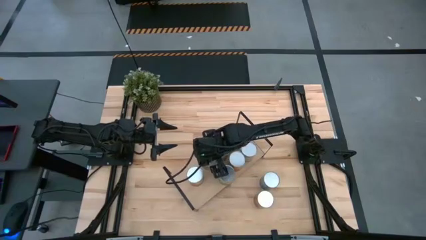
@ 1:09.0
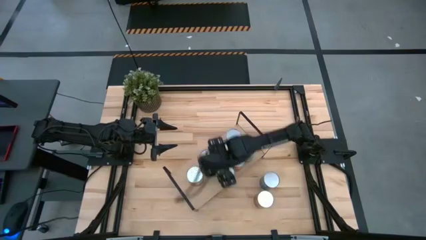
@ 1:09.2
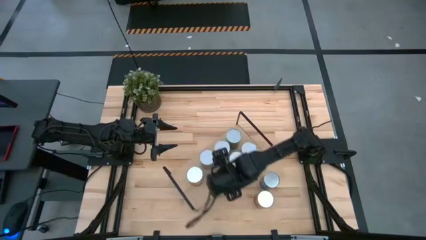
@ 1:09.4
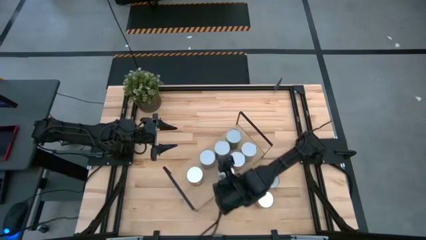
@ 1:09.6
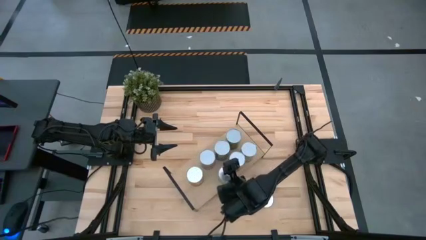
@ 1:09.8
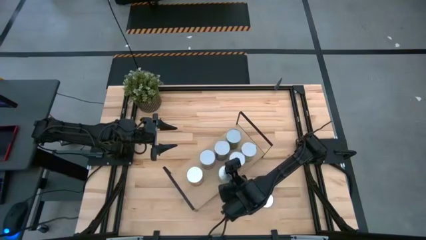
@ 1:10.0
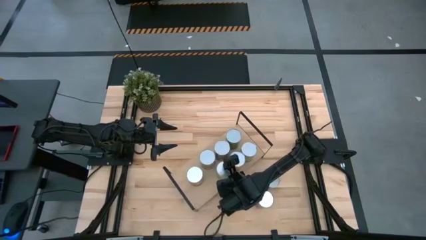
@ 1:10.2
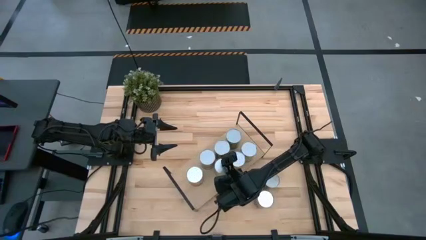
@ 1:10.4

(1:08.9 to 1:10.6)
Task: Pick and place cans onto a shelf
Adjust the canned oranges on the shelf

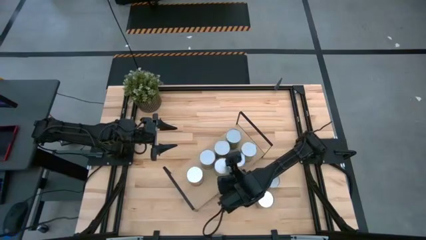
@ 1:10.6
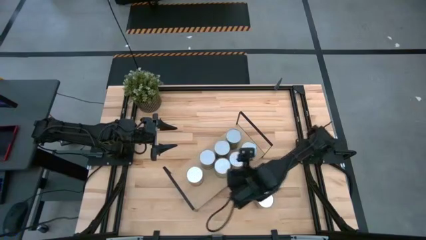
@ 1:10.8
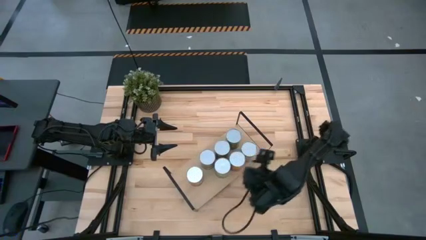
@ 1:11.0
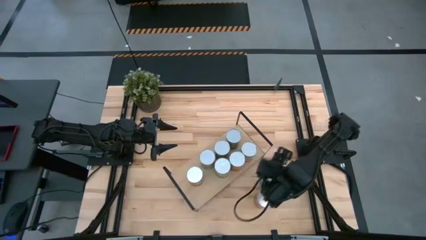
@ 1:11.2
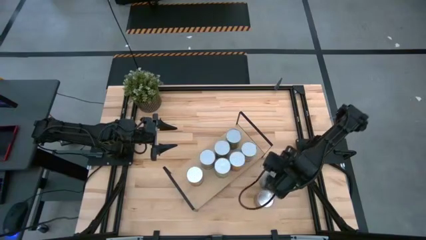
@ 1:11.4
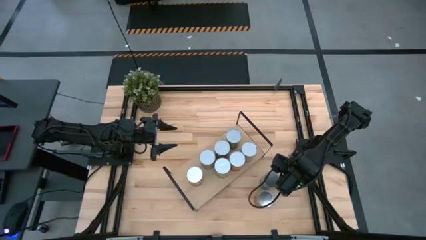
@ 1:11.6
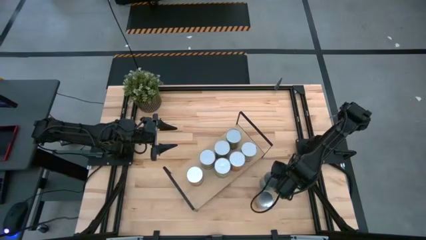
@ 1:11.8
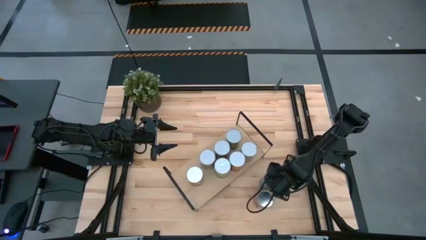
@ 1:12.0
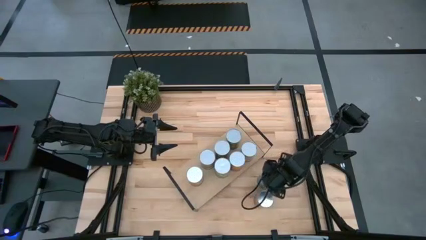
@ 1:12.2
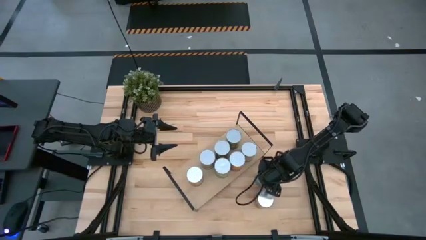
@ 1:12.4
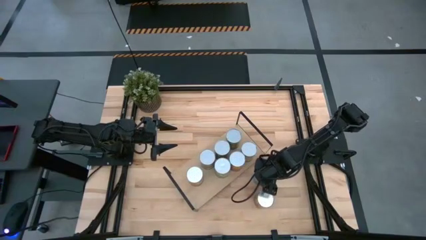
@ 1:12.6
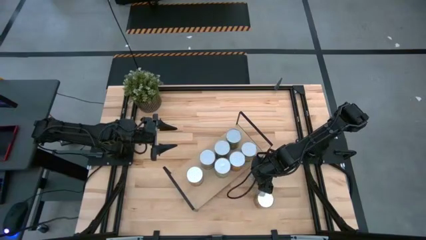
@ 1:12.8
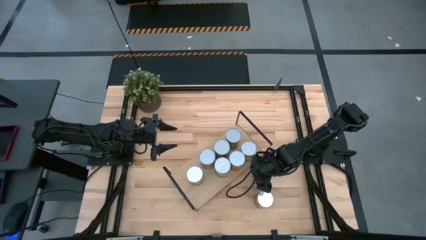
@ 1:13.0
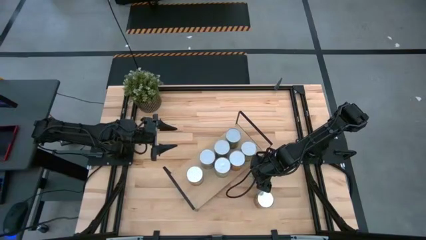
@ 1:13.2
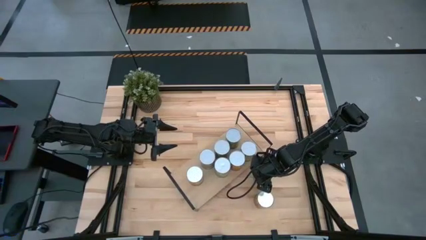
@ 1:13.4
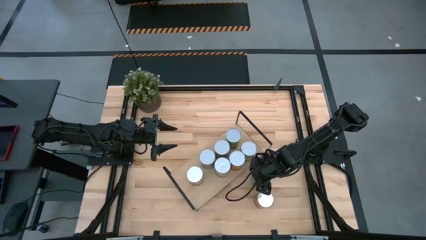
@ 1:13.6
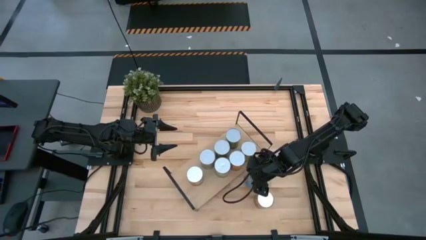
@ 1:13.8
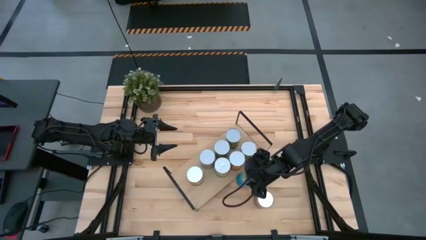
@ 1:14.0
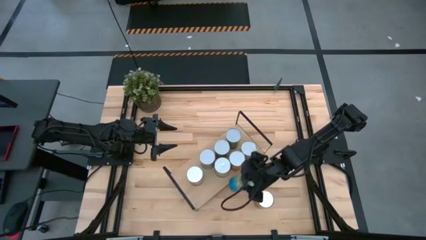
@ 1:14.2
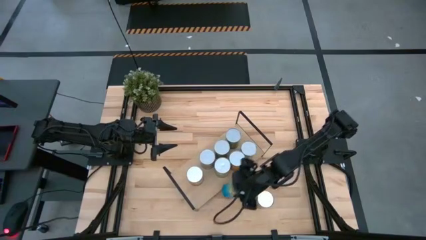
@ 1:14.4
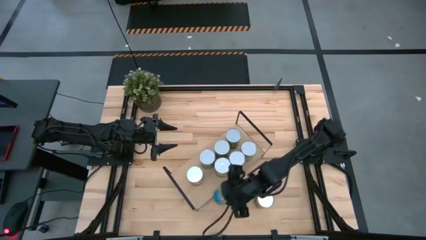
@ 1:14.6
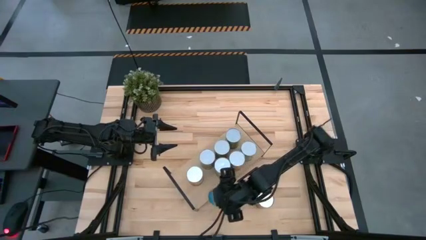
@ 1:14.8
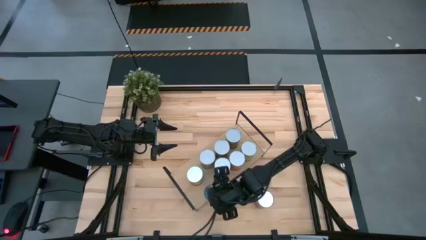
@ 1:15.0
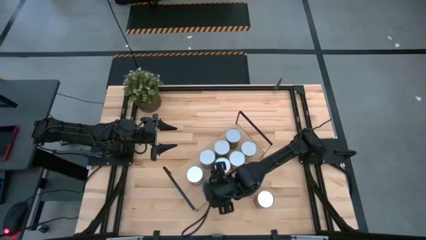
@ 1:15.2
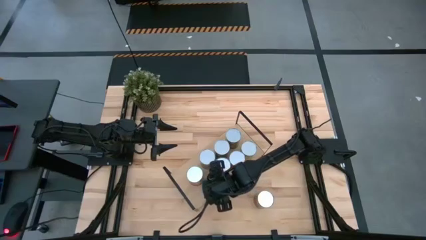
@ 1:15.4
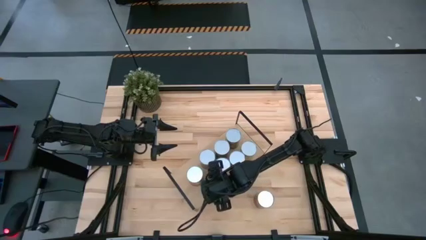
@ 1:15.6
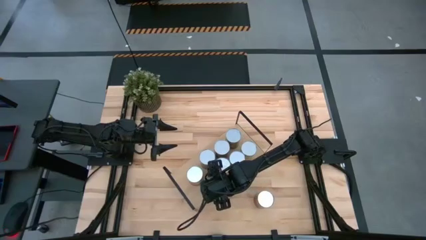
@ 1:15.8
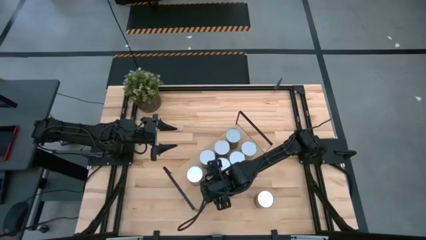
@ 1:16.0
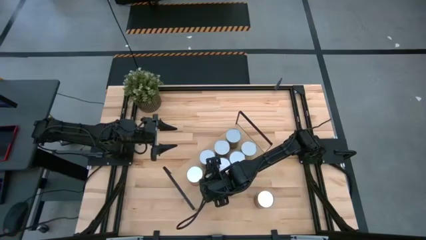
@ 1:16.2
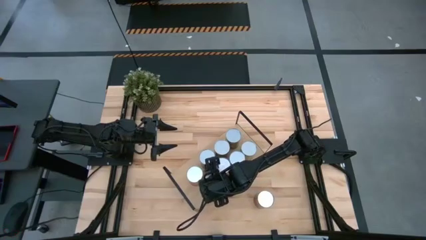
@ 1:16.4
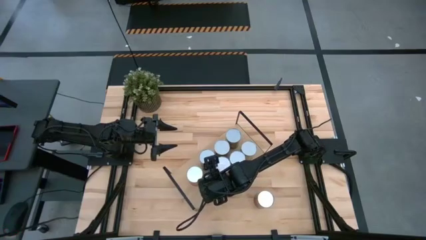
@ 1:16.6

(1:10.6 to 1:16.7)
Put the canned cherries on the shelf

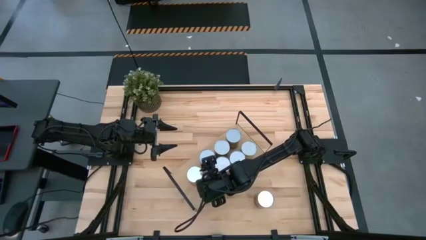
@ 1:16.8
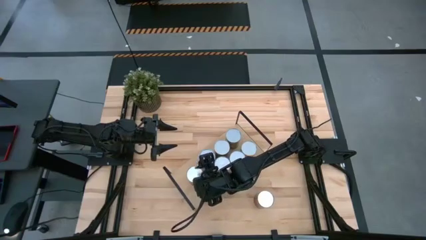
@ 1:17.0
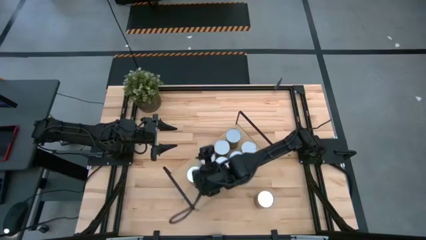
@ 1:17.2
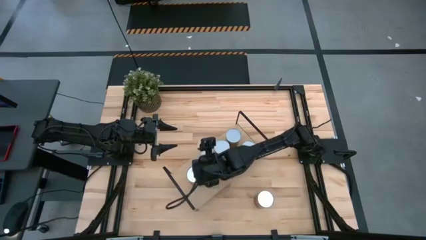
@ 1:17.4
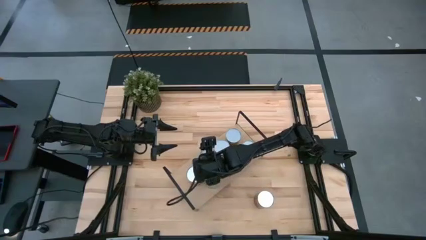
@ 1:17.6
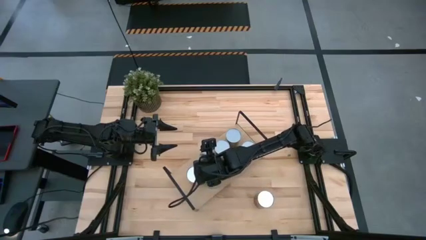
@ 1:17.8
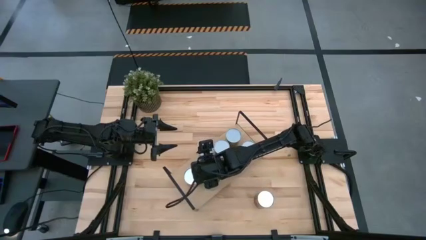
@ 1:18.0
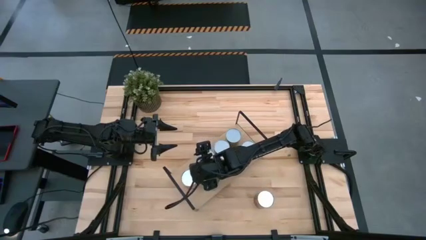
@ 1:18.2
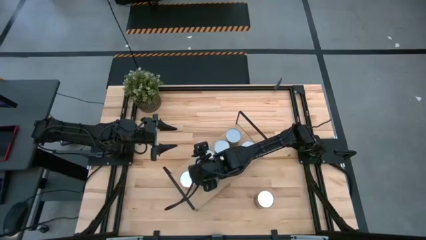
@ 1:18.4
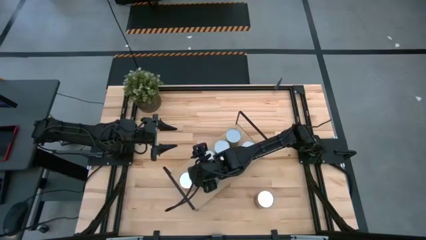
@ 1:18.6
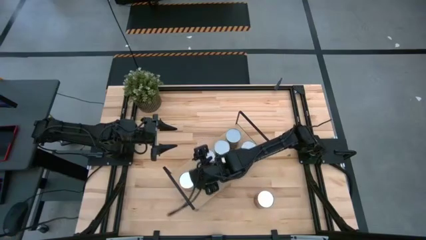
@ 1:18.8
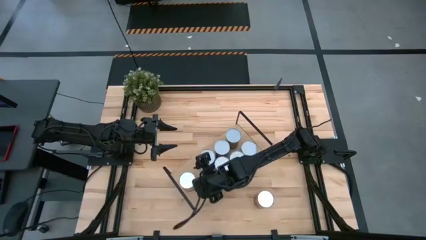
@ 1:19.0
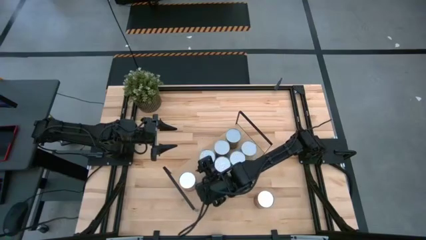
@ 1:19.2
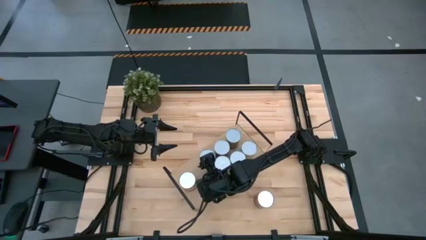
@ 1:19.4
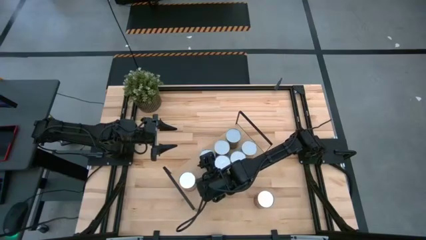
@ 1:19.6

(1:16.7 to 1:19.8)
Adjust the cans on the shelf

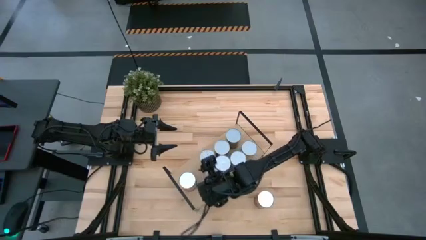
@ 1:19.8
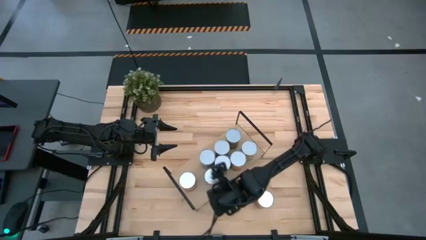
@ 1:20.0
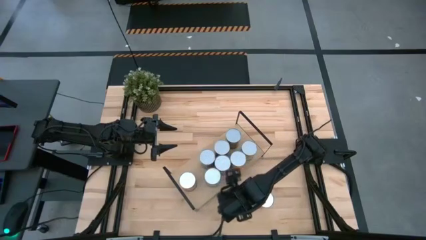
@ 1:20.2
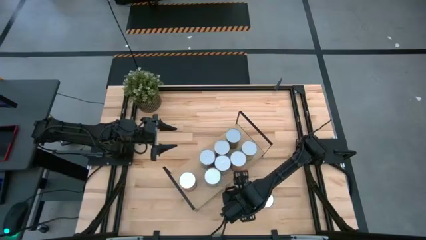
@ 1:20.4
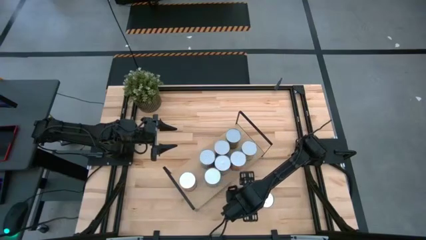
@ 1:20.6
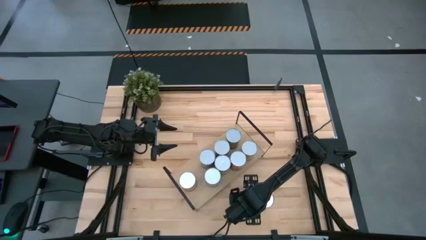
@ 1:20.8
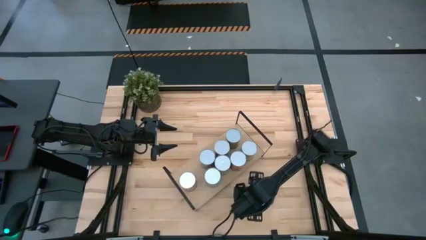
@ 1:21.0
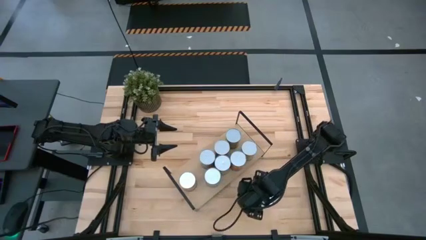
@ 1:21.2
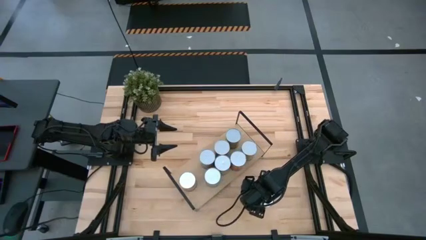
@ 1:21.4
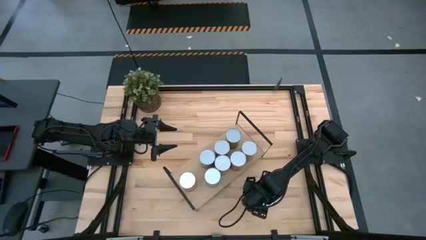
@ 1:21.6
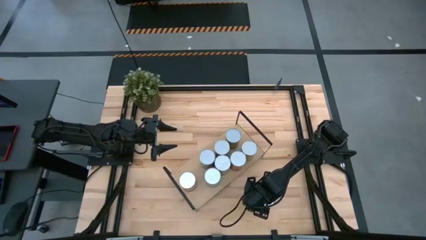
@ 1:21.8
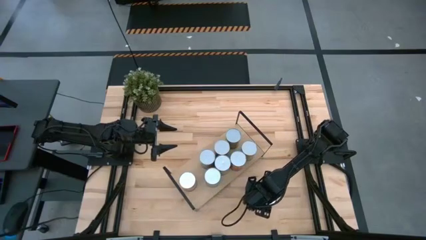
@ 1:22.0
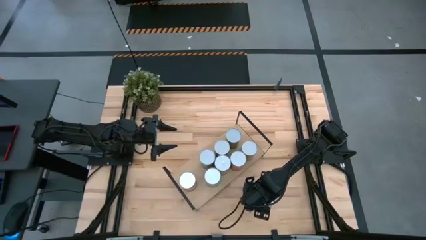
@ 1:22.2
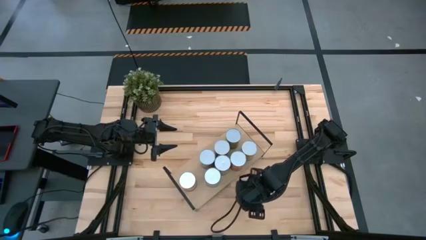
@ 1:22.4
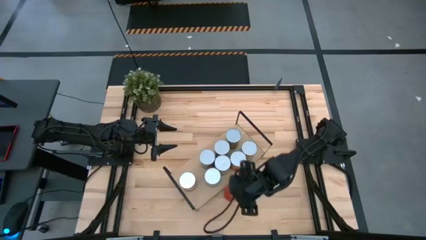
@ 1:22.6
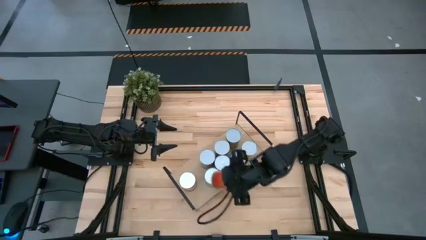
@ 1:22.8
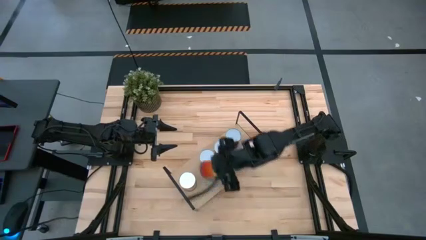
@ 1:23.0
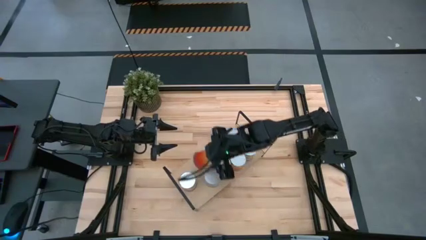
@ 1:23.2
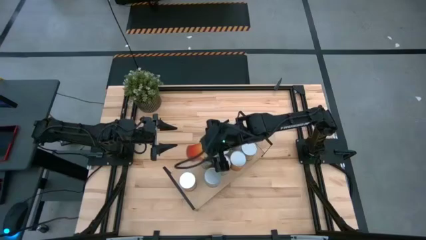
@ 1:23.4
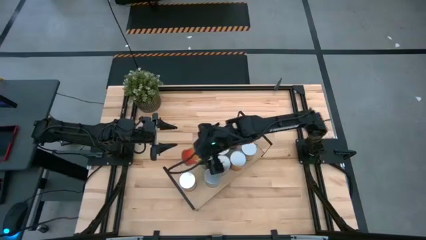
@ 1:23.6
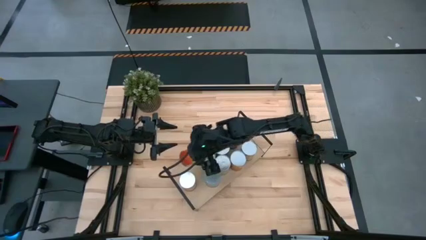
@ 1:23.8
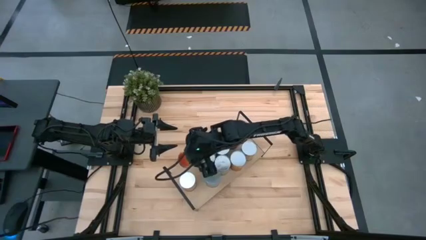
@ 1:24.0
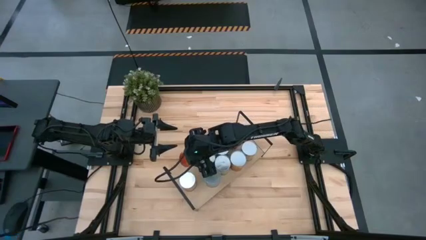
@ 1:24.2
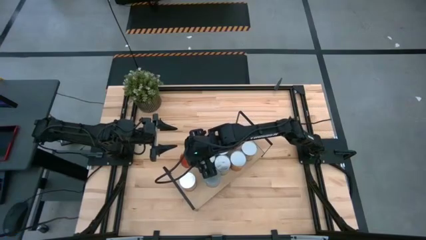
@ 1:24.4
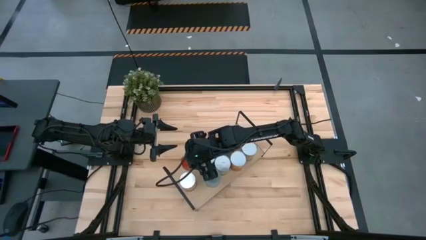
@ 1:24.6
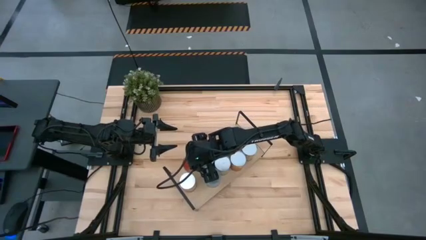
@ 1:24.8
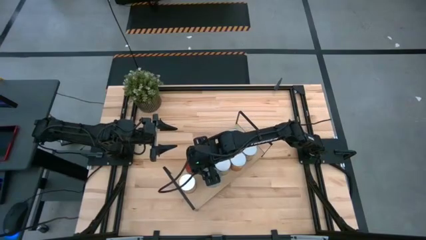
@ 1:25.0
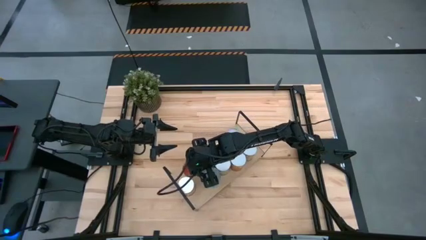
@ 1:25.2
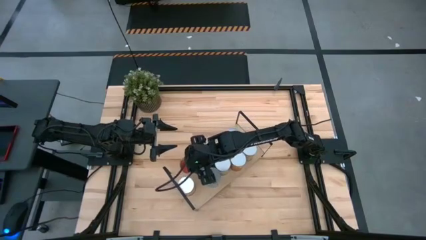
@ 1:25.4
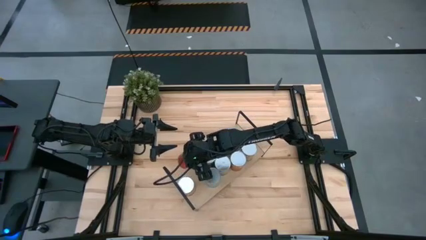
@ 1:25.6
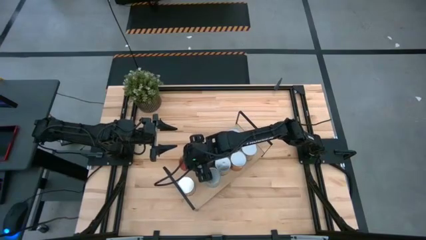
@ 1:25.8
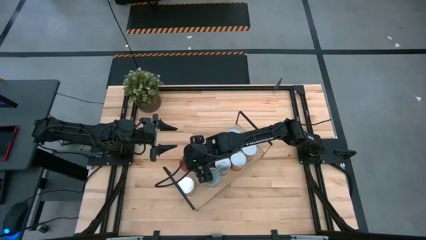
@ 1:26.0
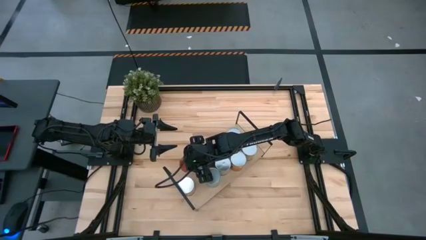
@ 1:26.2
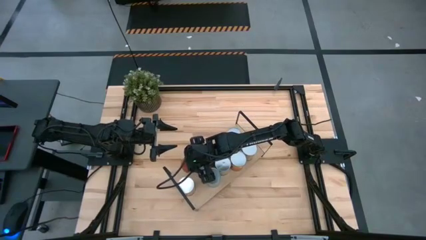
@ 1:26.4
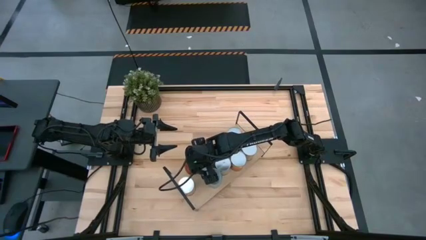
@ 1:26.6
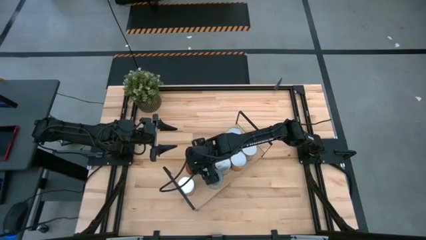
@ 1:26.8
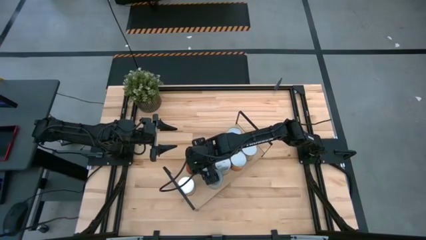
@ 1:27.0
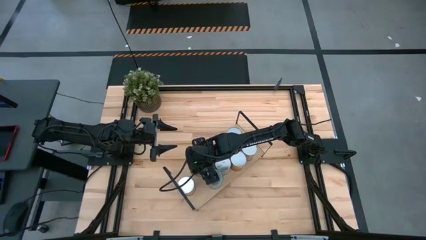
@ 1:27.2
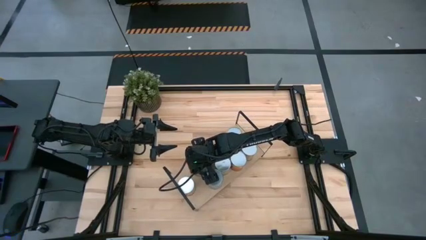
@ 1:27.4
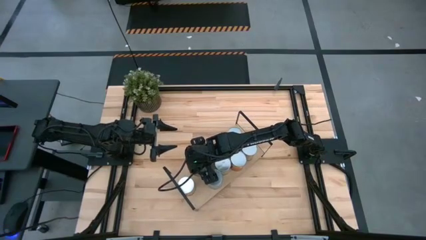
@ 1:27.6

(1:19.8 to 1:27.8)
Put the canned pineapple on the shelf
